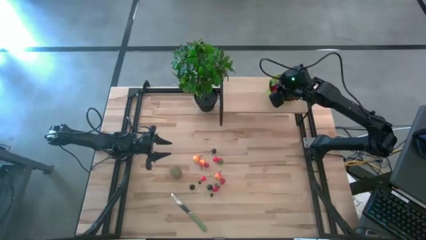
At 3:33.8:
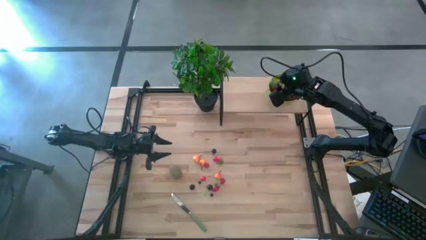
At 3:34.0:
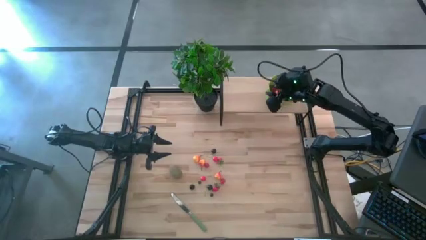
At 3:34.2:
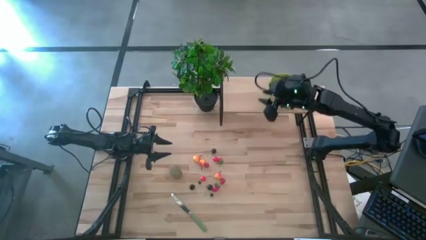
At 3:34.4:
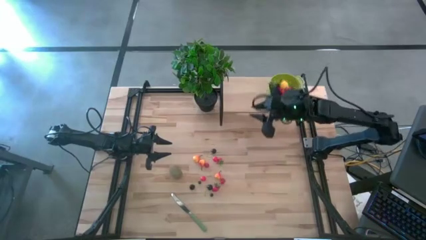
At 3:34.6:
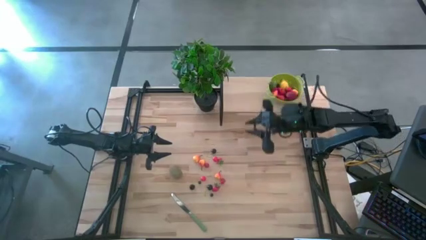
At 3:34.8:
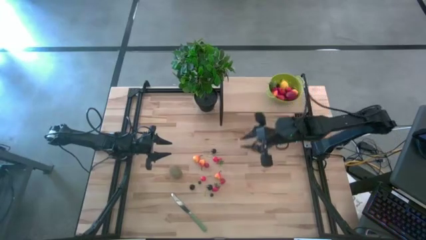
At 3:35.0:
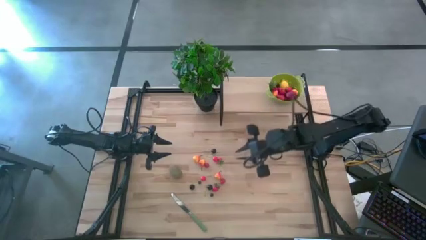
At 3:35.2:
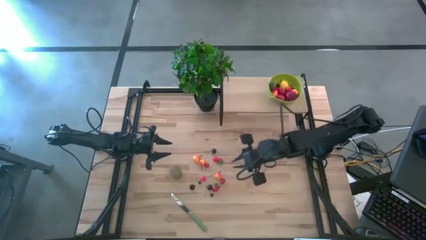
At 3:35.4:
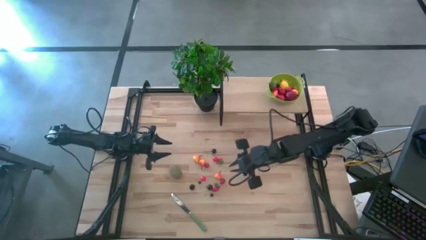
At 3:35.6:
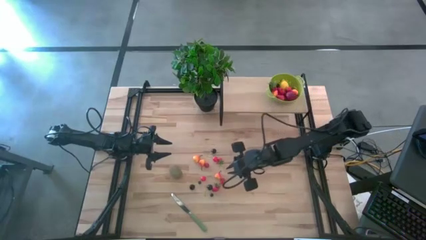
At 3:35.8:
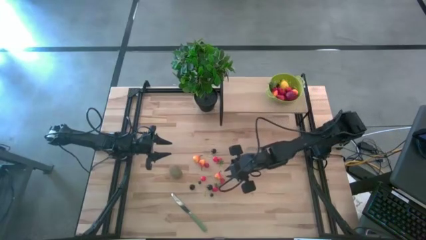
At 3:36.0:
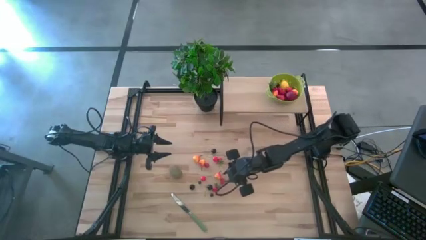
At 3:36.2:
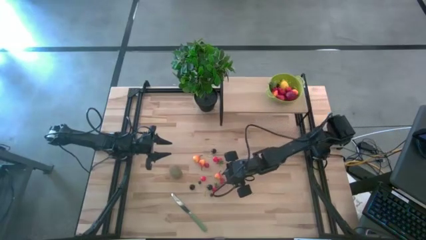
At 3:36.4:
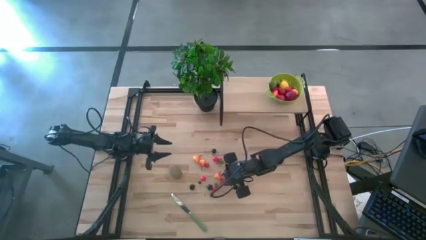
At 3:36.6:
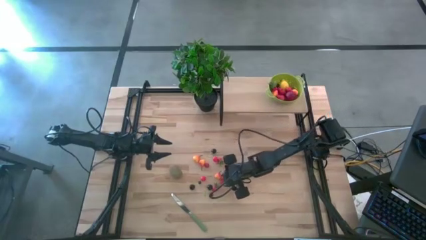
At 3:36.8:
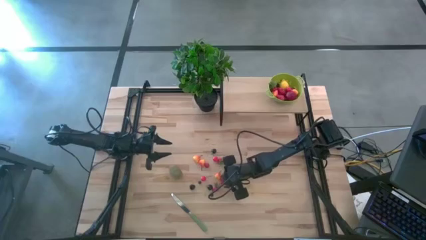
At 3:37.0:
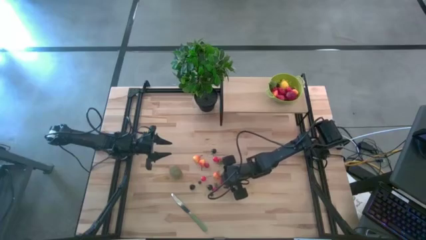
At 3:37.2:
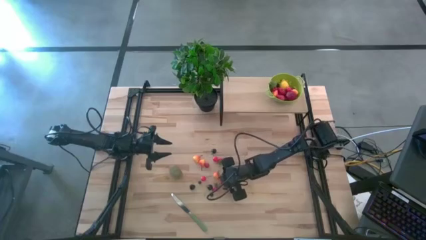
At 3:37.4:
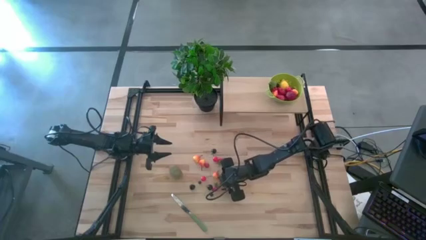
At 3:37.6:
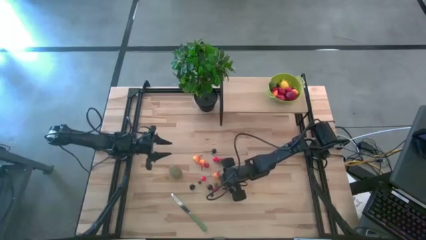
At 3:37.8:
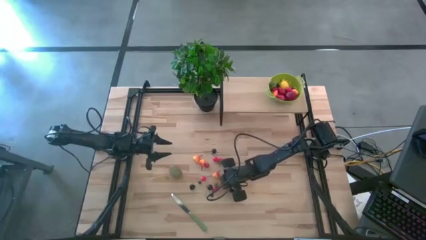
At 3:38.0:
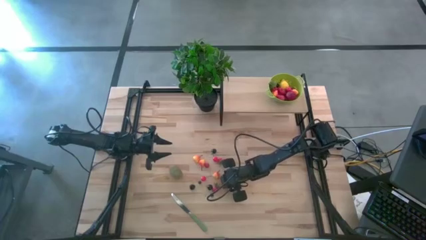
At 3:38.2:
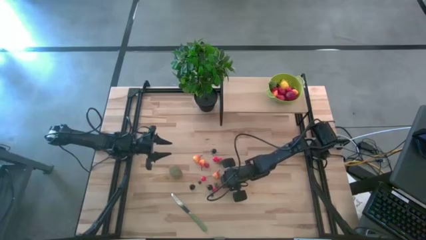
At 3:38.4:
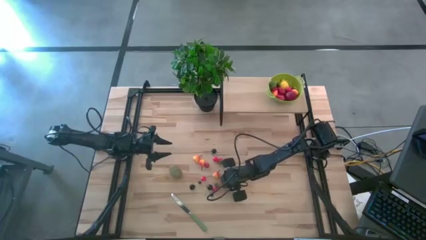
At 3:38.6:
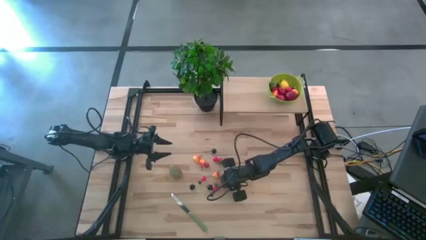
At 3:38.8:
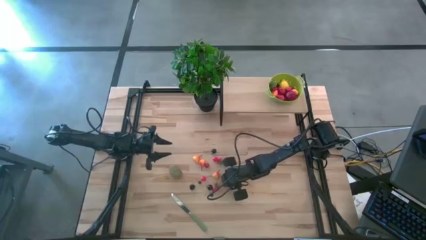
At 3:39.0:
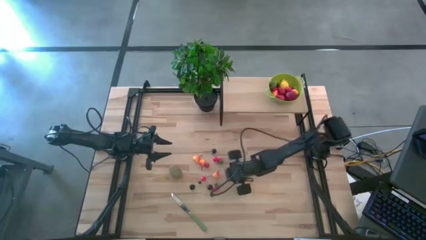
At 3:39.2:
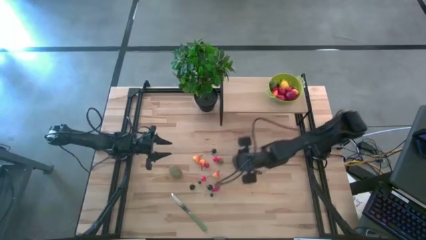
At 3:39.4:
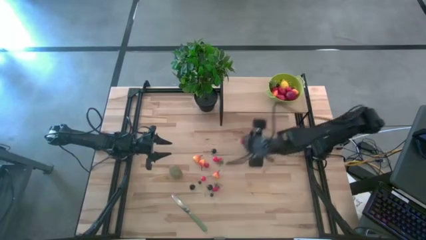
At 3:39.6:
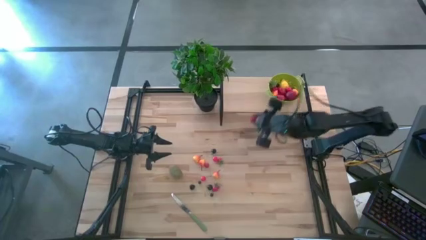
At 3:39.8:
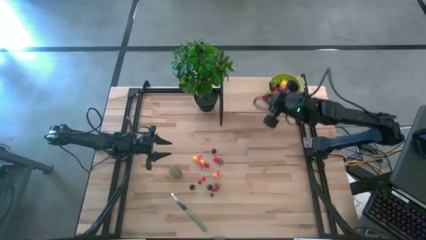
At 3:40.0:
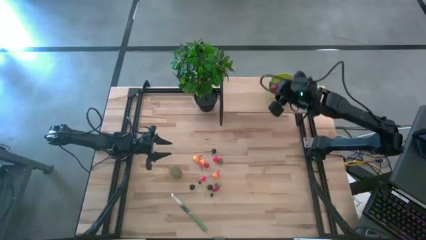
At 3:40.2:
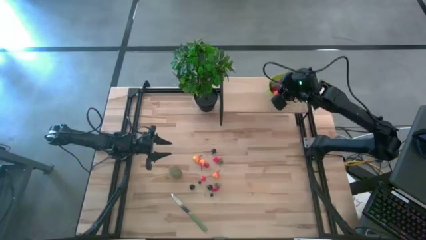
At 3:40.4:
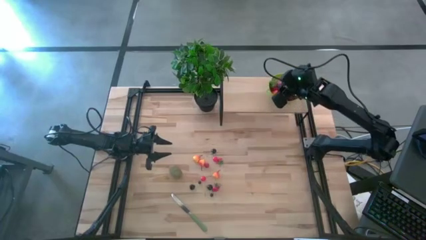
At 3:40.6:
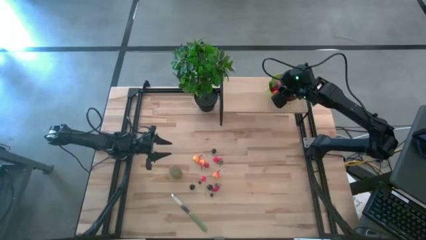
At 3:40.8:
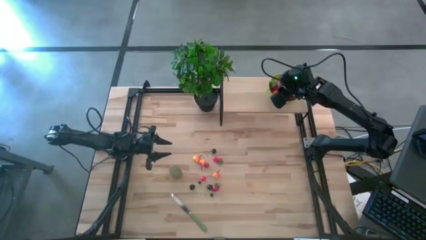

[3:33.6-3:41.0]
Task: Pick & Place Fruit
Put the raspberry into the green strainer bowl on the shelf

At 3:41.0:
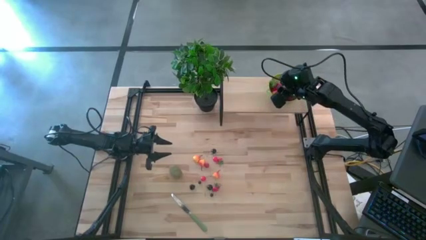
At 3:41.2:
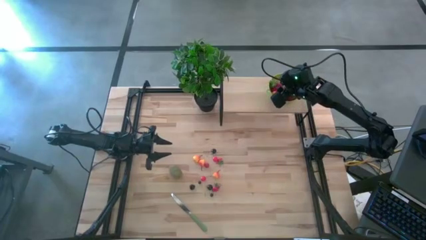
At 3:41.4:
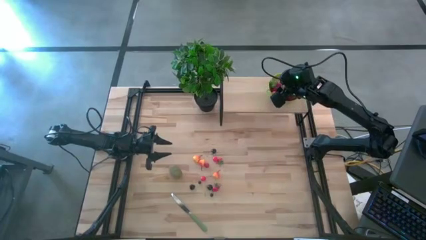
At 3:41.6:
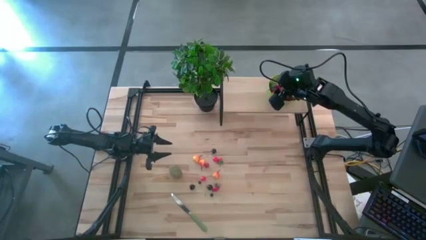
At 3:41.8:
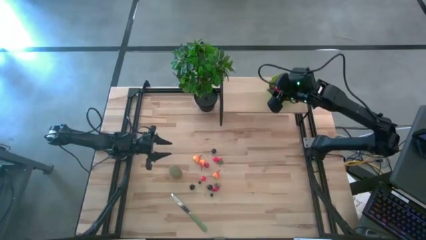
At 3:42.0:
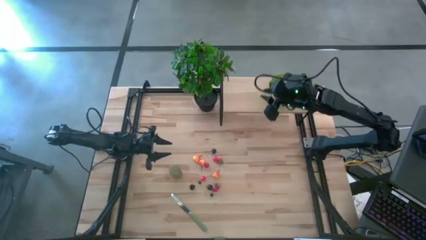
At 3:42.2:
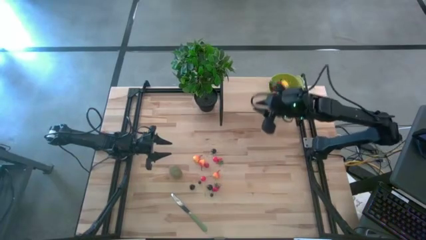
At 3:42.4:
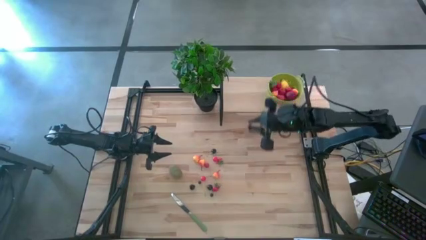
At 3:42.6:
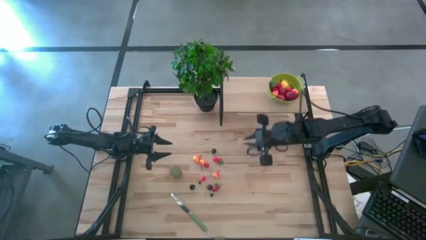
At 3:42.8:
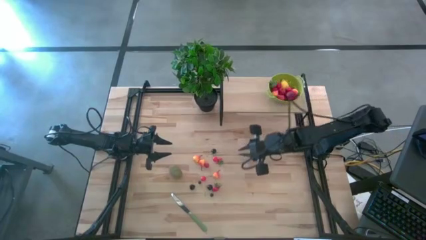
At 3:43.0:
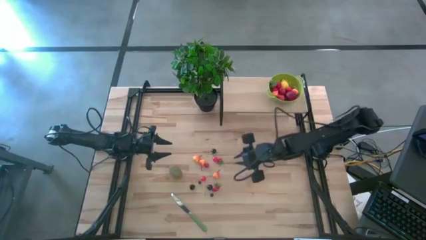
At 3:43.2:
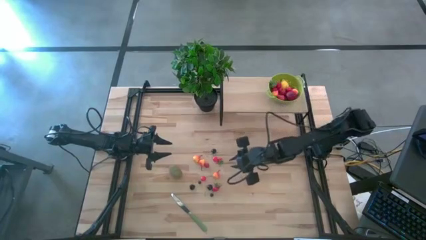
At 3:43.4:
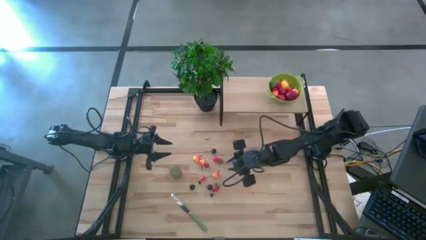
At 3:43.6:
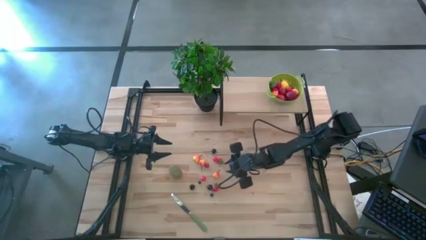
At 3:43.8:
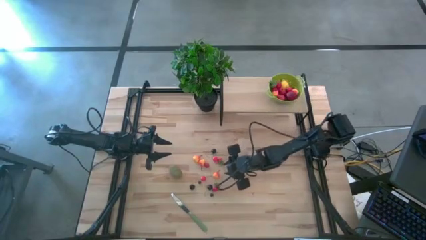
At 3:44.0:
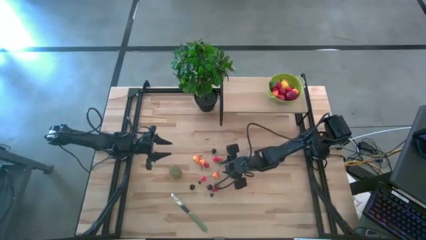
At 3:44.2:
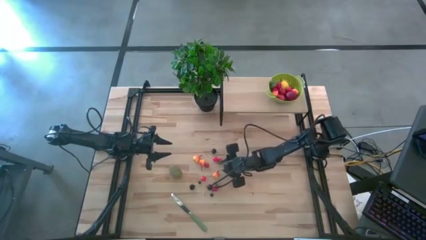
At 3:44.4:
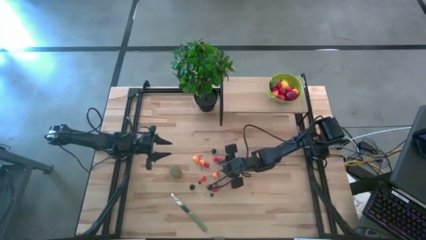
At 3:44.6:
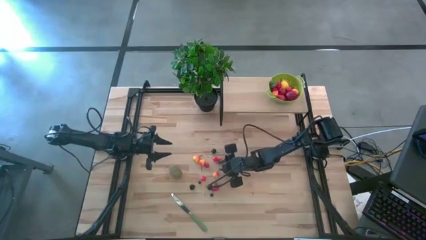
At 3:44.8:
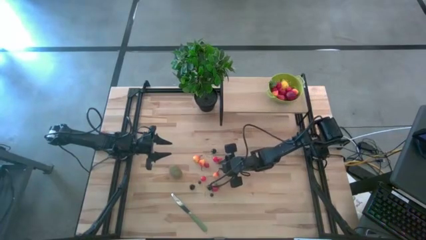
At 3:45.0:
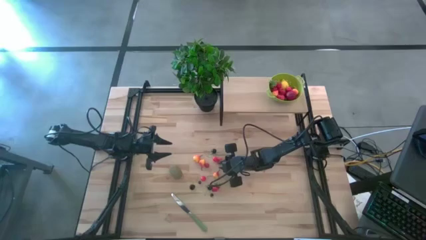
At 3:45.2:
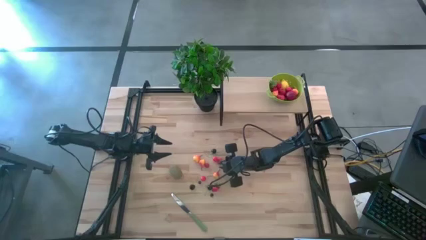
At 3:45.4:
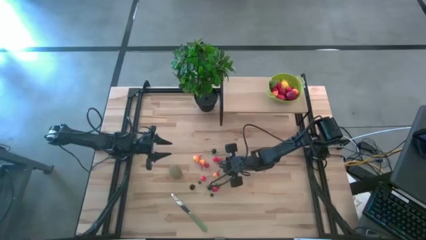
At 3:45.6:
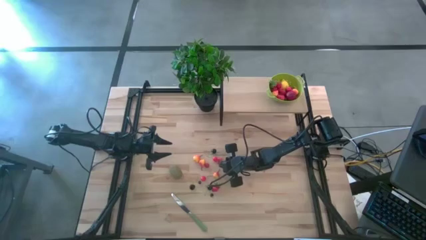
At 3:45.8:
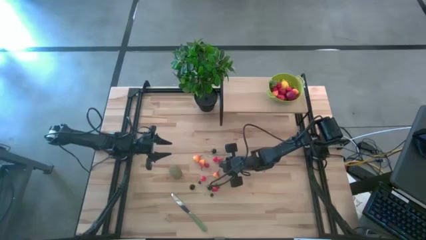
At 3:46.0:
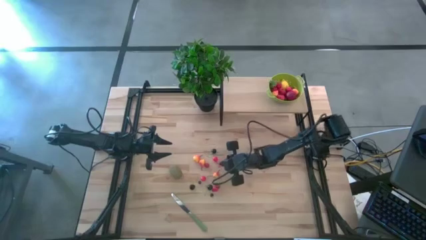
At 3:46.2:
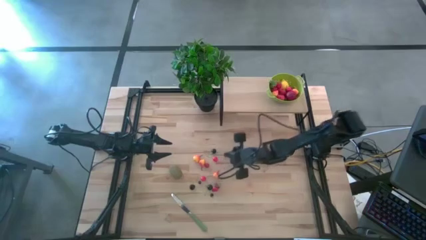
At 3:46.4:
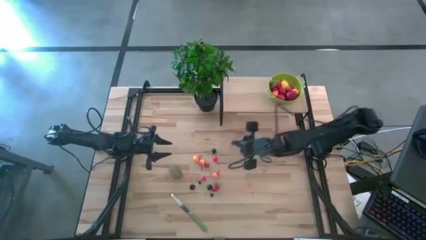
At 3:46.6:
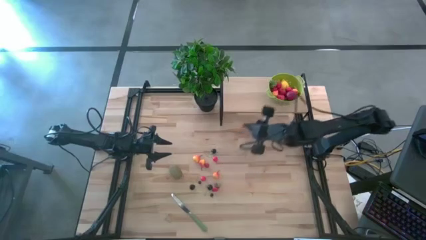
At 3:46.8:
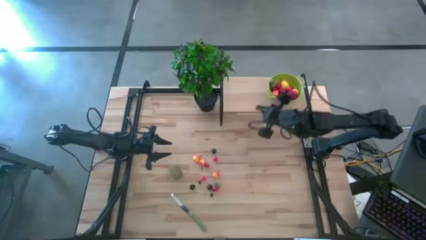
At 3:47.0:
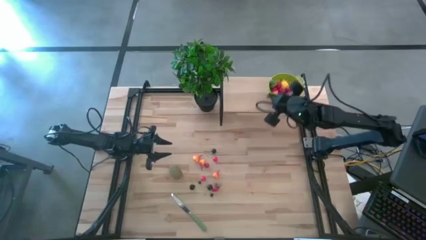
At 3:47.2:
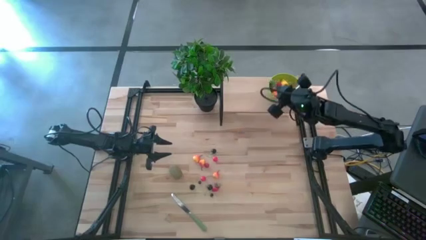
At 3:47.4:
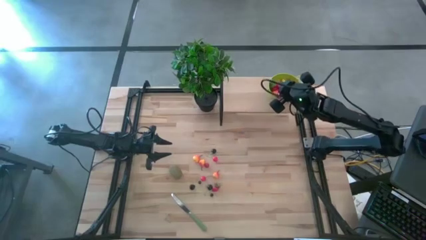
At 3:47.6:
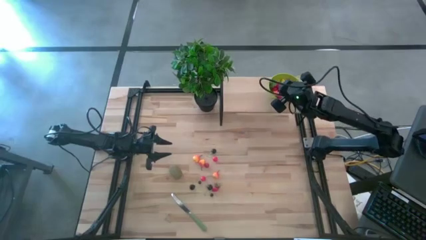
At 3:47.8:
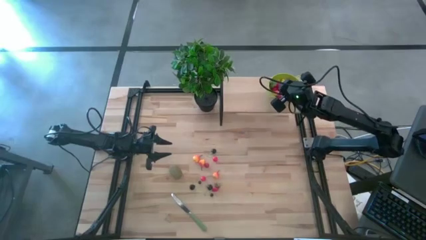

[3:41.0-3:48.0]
Put the strawberry into the green strainer bowl on the shelf
